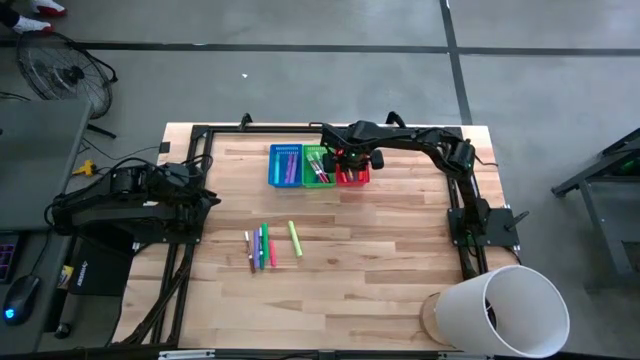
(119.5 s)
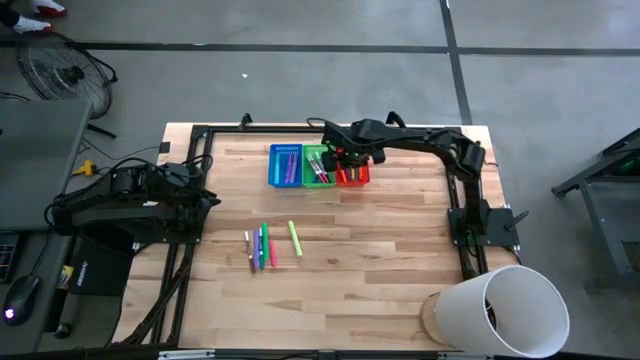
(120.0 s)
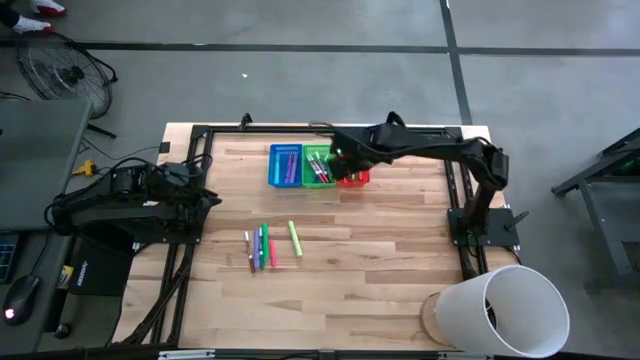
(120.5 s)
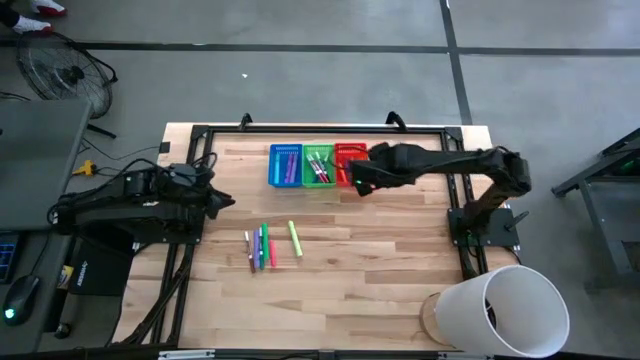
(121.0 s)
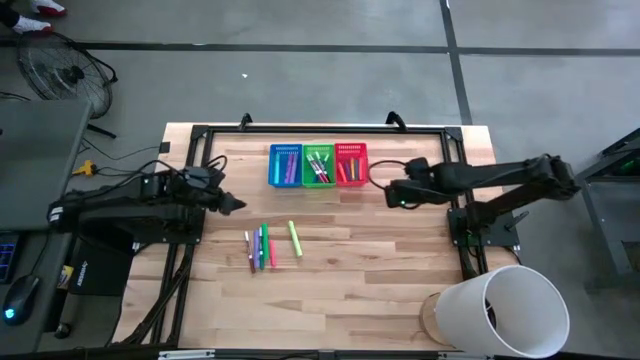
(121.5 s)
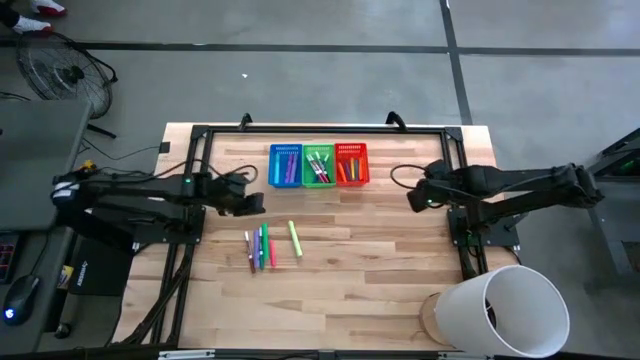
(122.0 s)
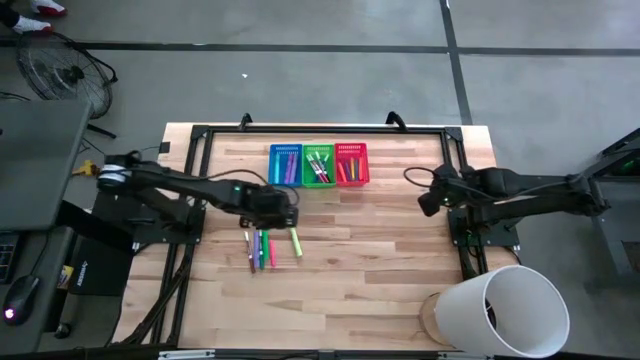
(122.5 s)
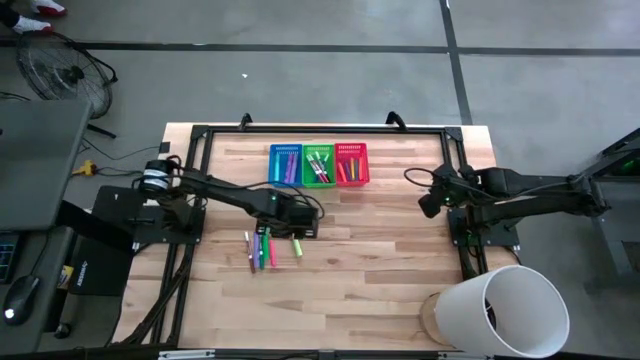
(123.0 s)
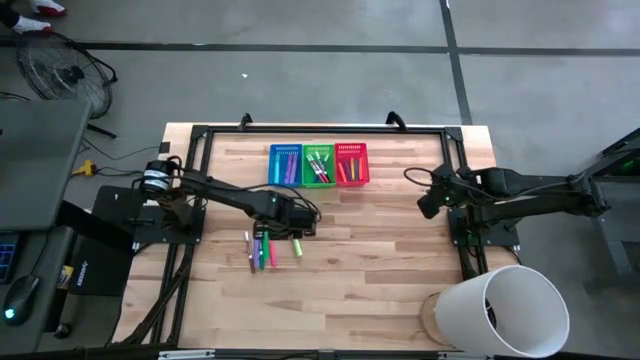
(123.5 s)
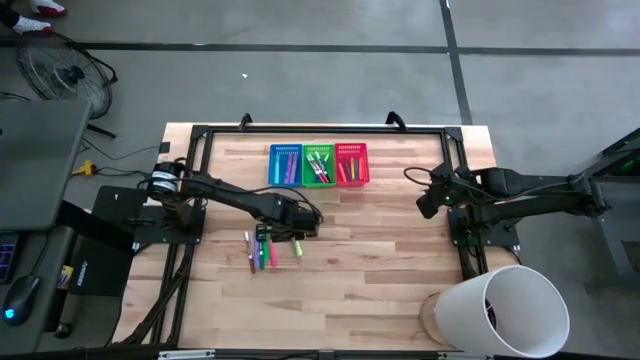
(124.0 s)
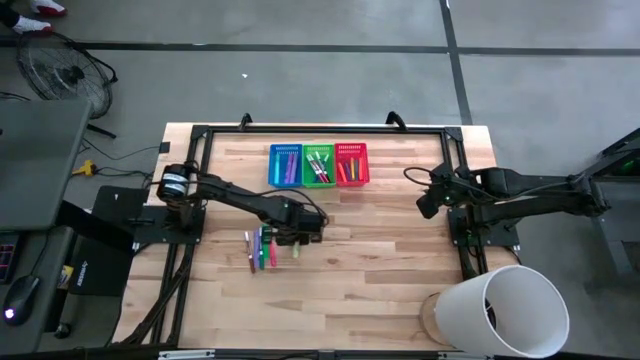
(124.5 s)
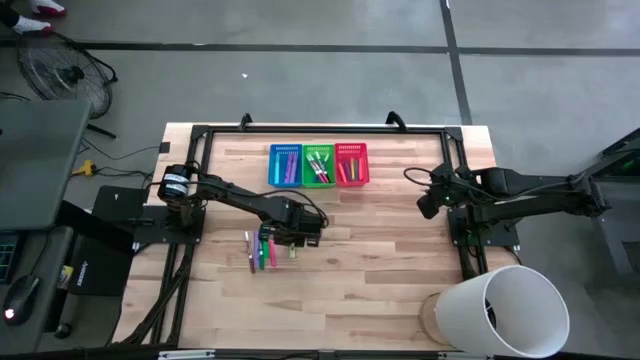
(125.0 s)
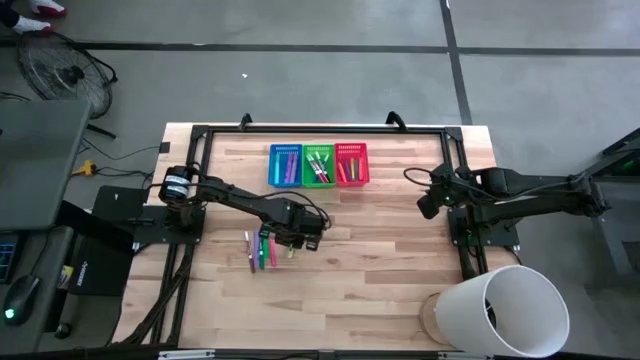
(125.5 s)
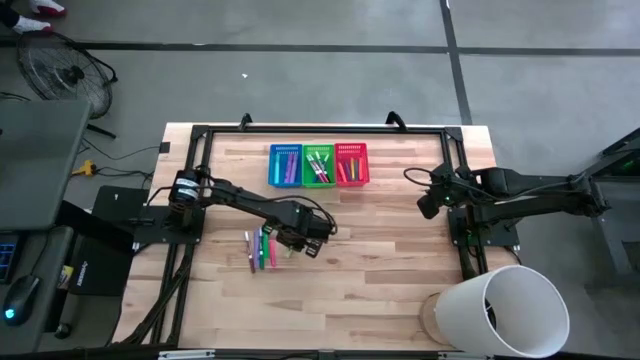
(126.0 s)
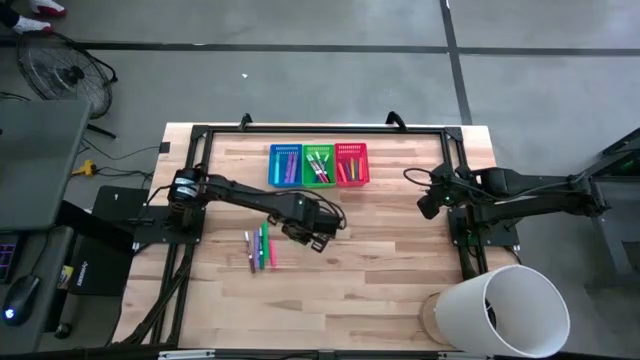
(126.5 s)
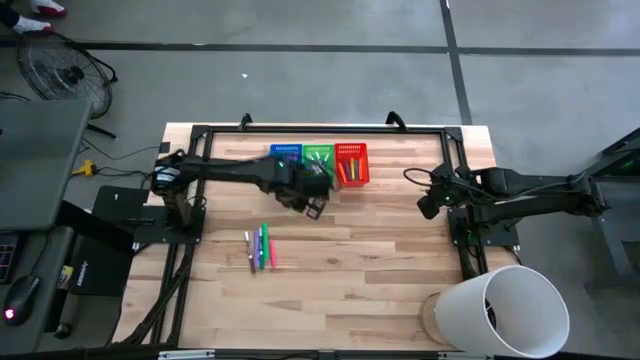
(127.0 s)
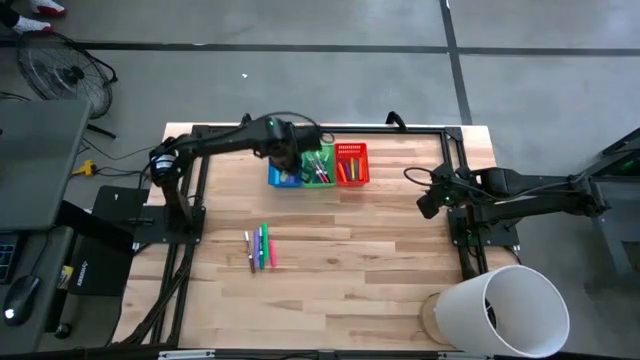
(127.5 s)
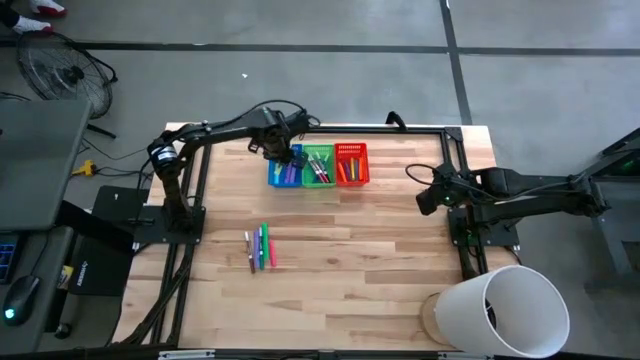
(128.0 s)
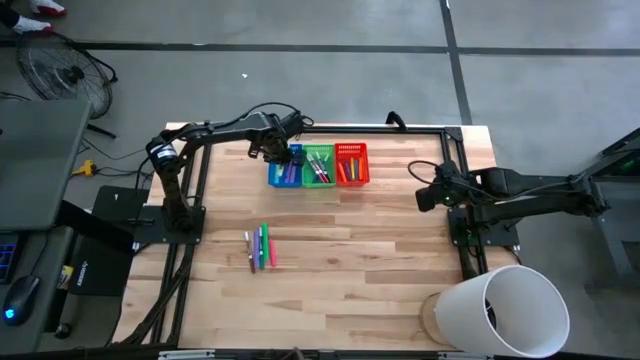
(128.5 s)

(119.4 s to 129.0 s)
Task: Pick & Place Markers
Put the mint green highlighter into the blue bin

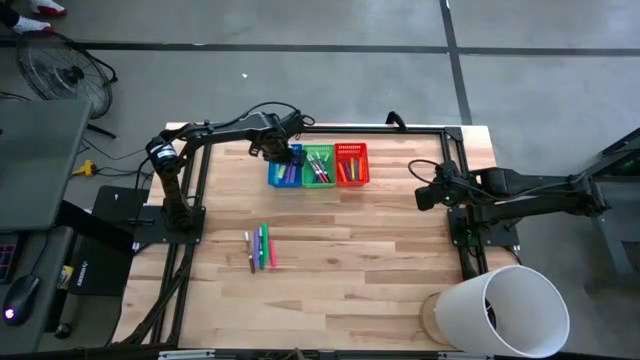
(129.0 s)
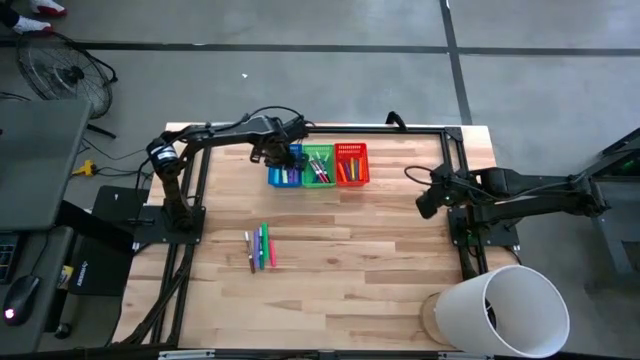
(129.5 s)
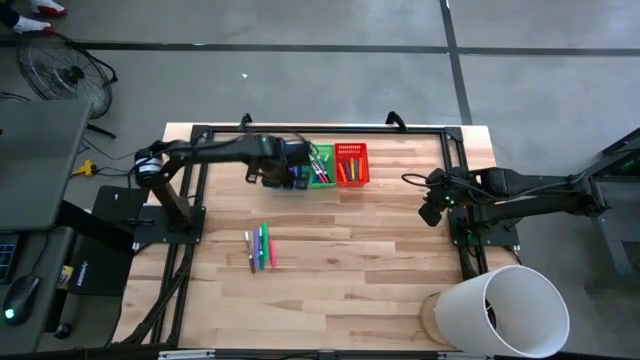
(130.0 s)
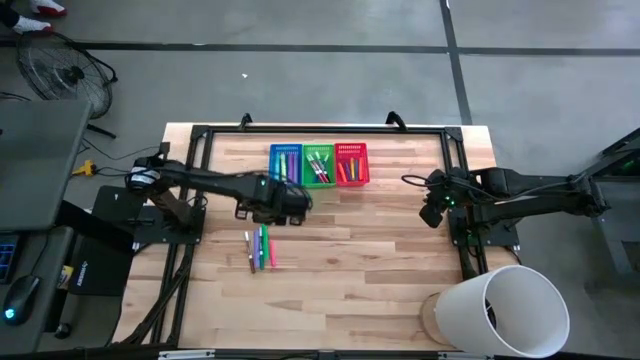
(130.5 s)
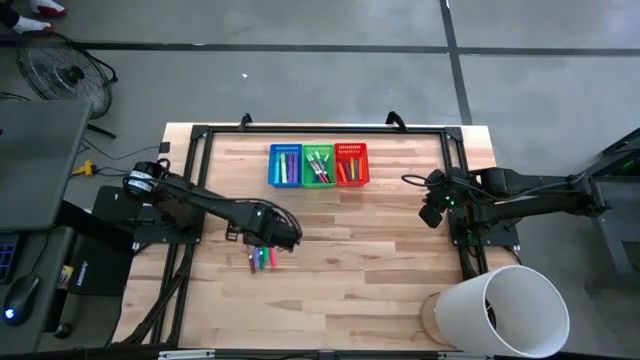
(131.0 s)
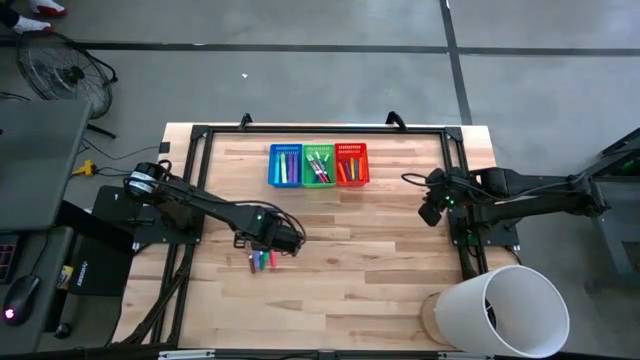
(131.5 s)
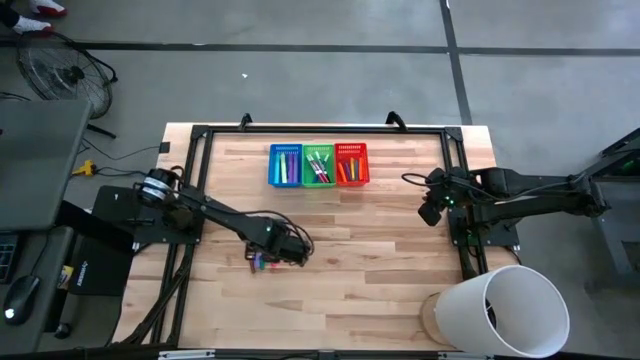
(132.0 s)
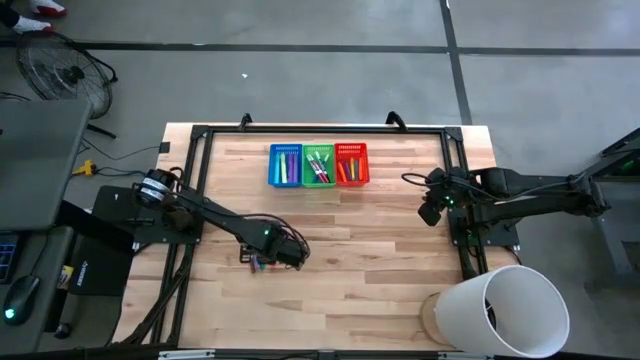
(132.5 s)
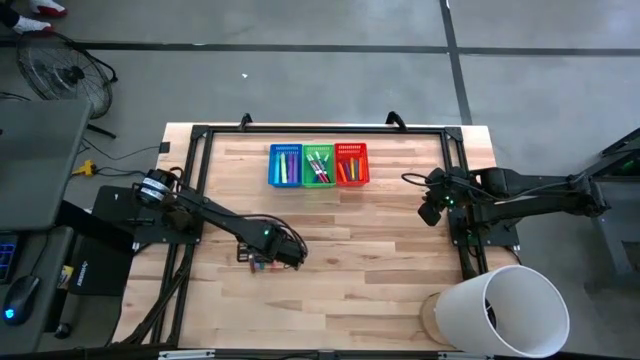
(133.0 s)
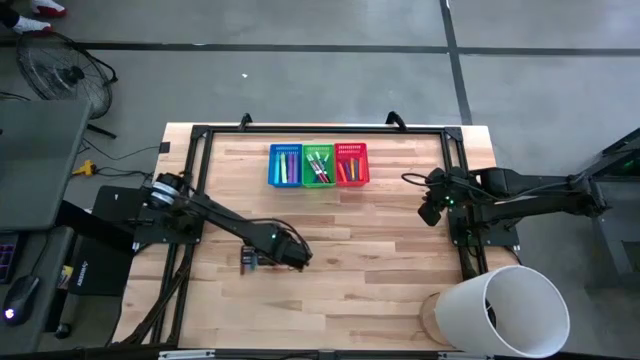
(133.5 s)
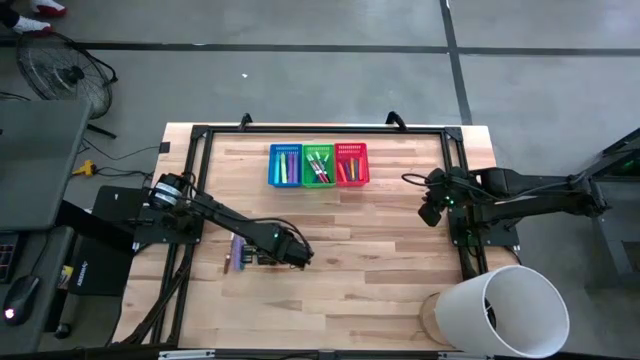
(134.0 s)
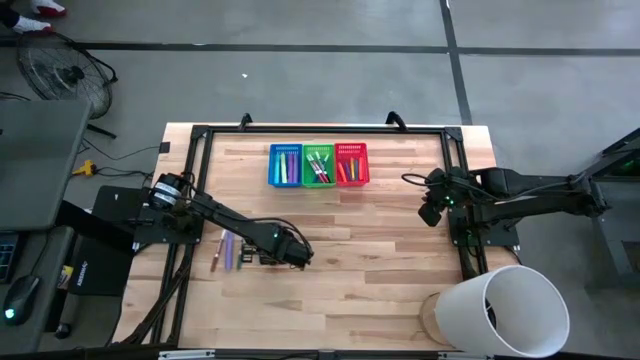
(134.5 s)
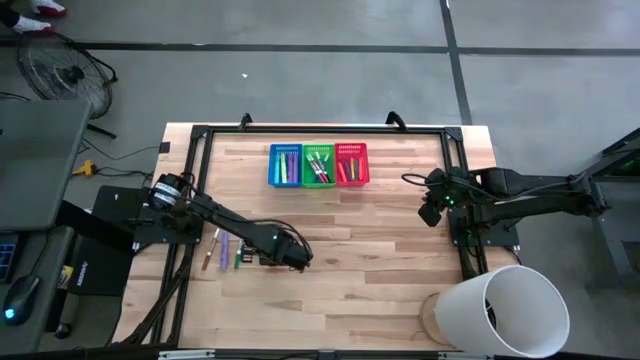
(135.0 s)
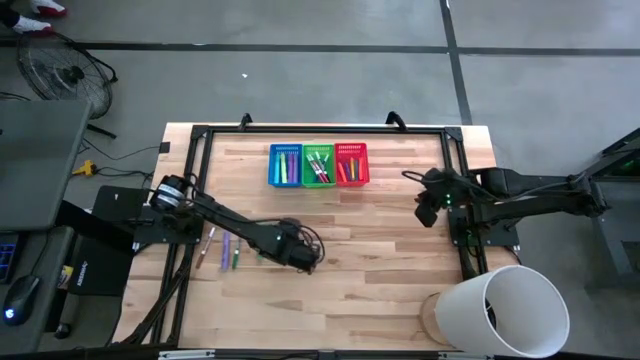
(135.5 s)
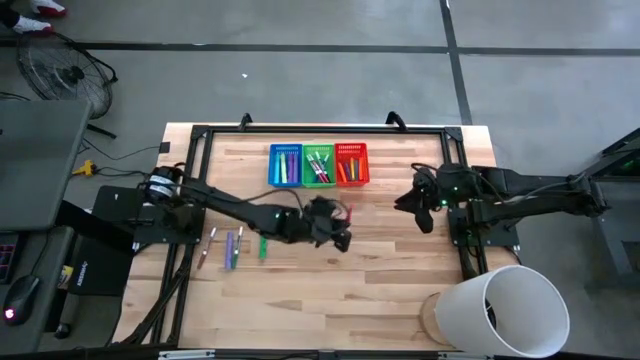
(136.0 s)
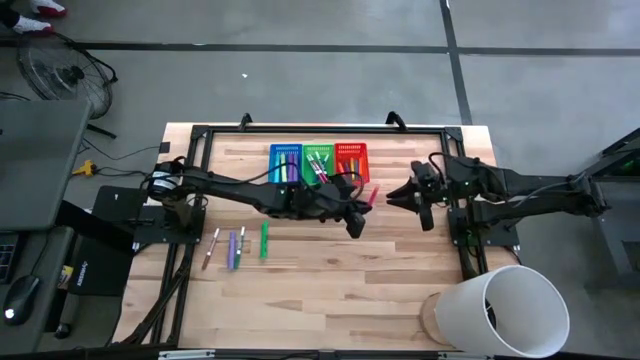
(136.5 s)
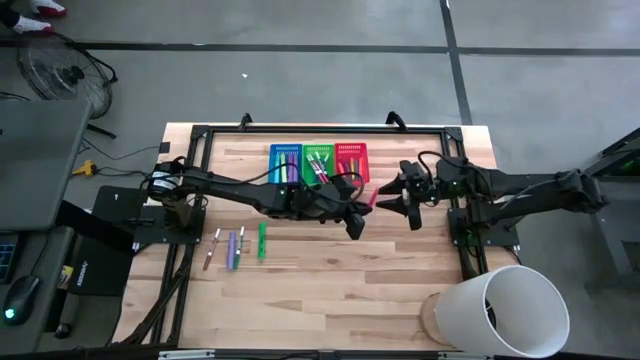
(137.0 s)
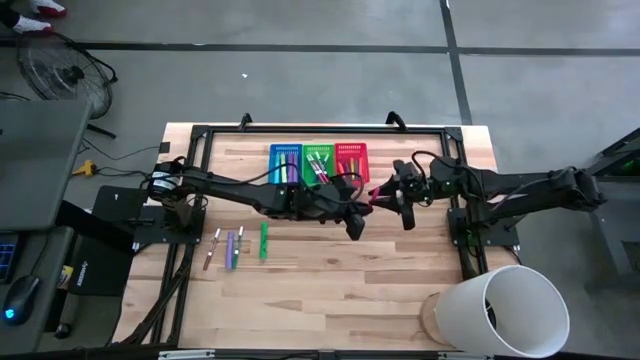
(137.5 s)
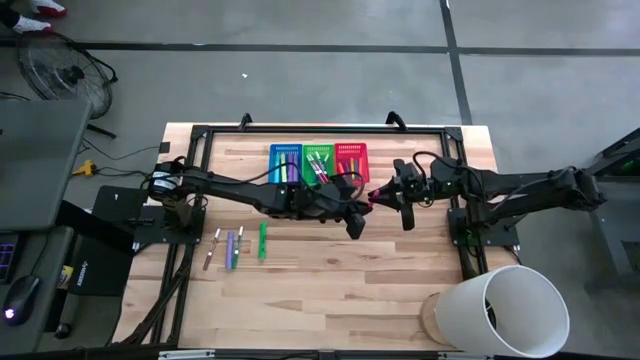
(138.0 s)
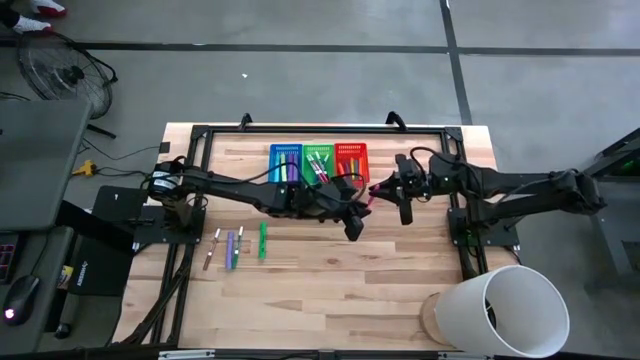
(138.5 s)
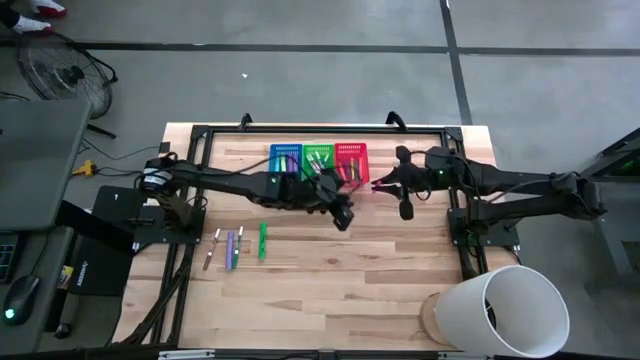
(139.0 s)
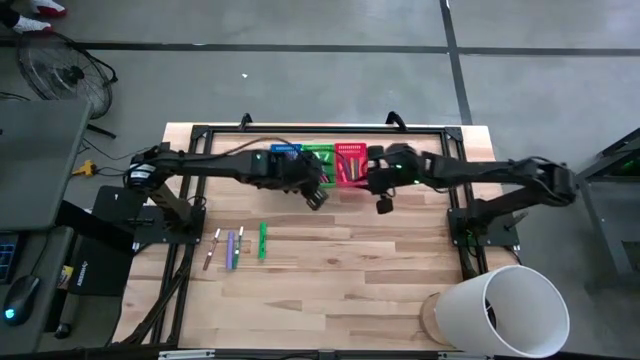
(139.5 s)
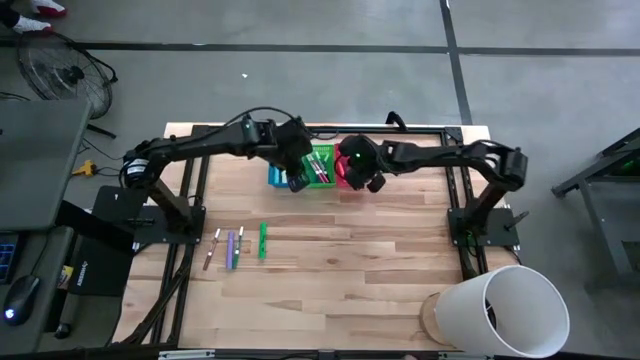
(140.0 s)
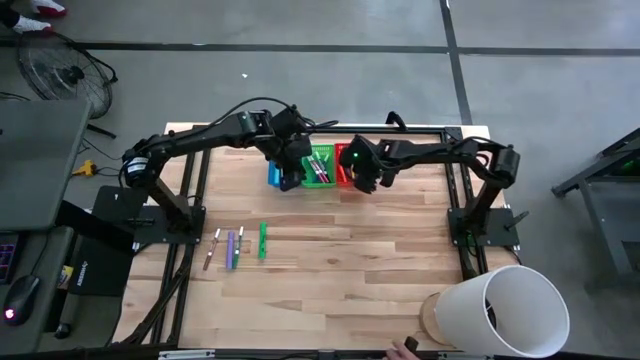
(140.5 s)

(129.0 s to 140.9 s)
Put the pink highlighter into the red bin
